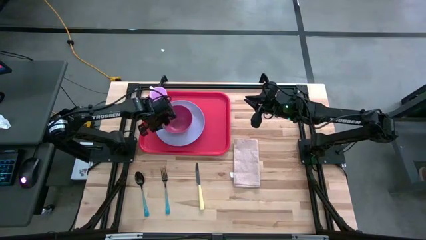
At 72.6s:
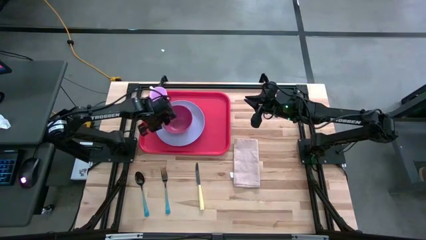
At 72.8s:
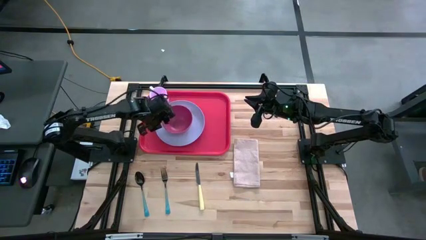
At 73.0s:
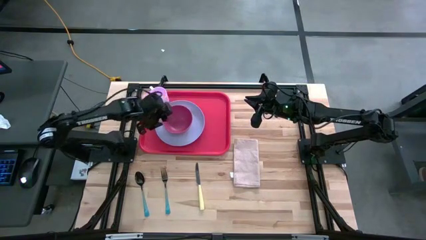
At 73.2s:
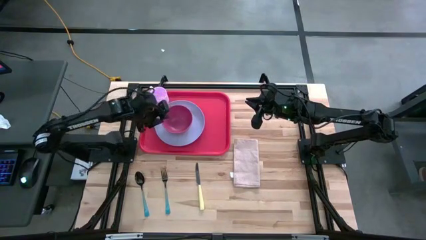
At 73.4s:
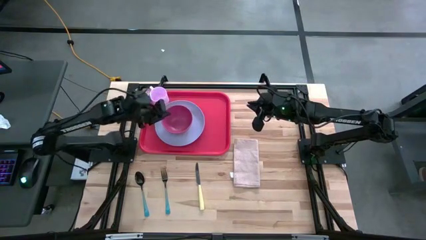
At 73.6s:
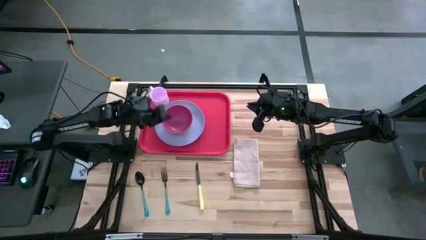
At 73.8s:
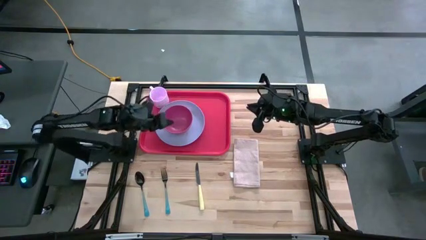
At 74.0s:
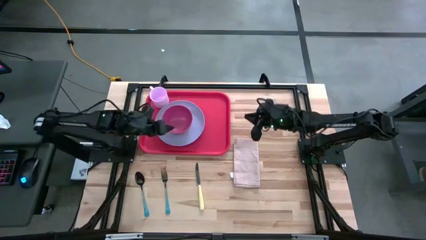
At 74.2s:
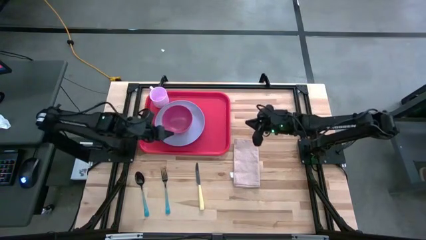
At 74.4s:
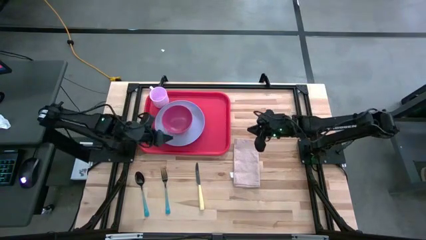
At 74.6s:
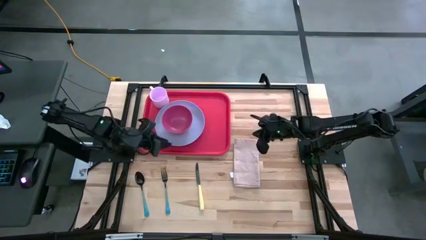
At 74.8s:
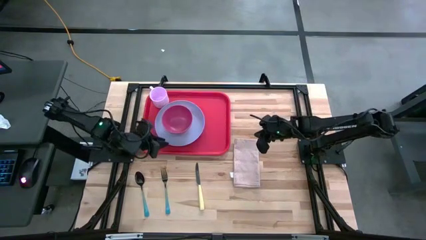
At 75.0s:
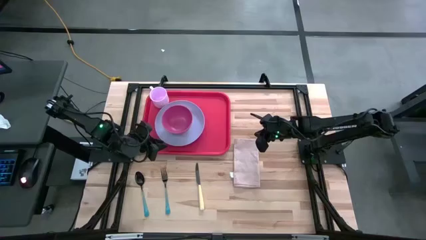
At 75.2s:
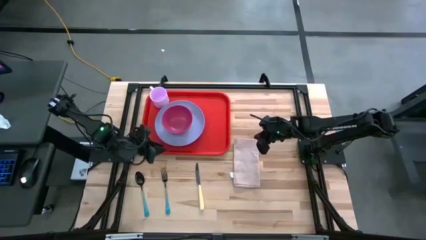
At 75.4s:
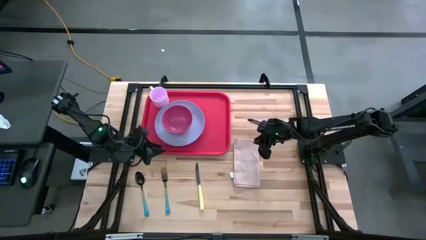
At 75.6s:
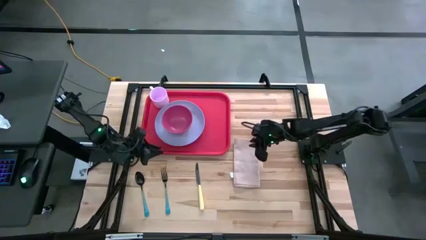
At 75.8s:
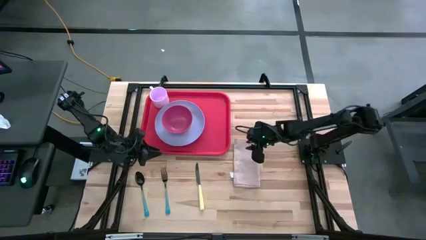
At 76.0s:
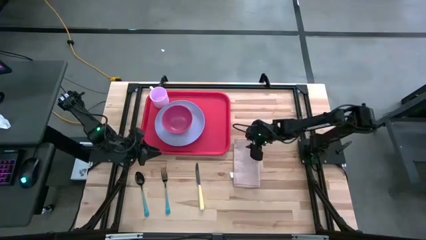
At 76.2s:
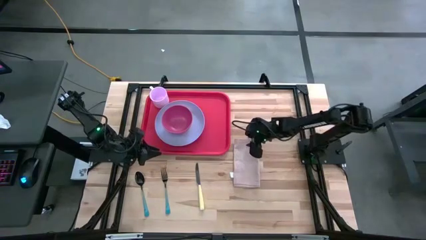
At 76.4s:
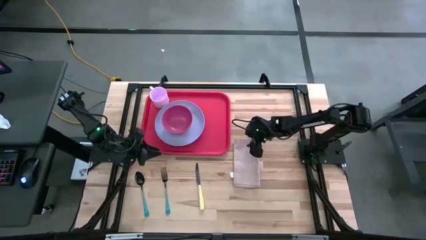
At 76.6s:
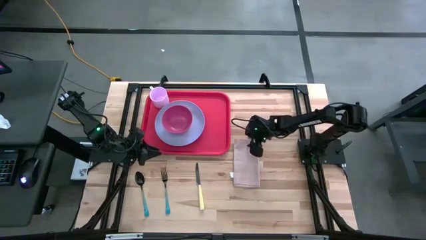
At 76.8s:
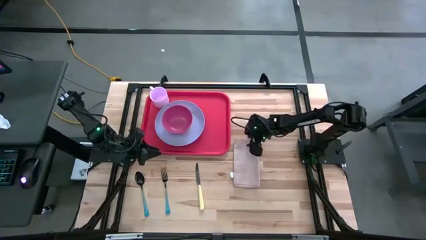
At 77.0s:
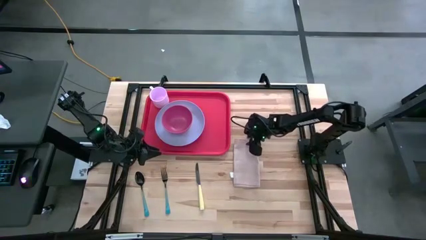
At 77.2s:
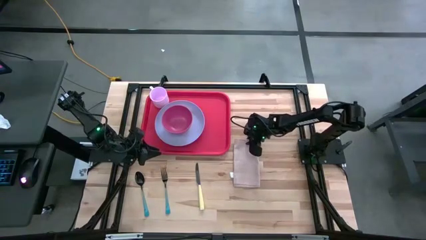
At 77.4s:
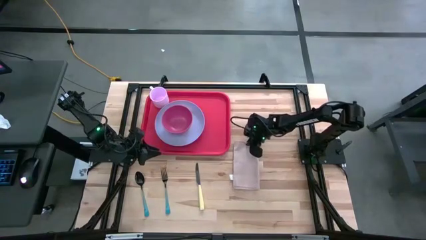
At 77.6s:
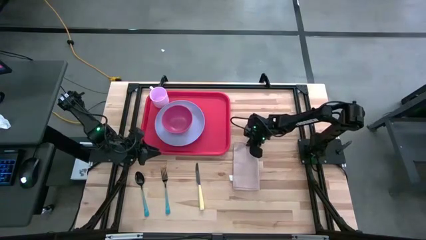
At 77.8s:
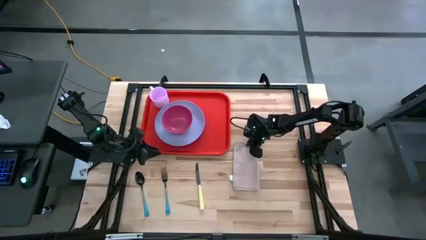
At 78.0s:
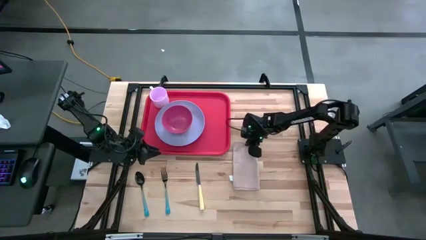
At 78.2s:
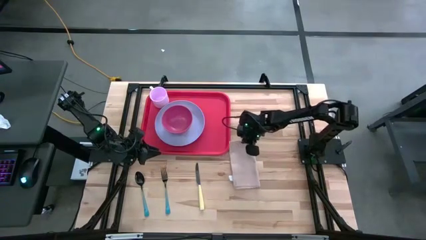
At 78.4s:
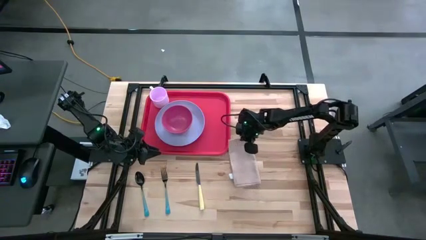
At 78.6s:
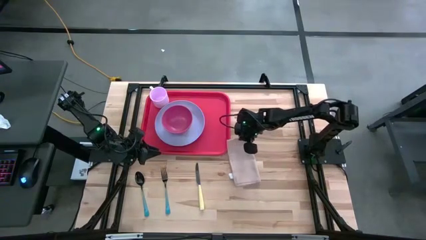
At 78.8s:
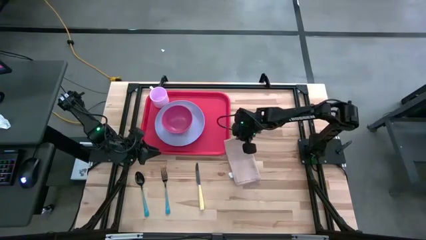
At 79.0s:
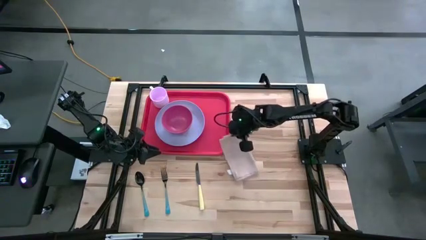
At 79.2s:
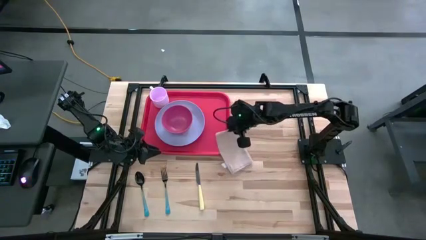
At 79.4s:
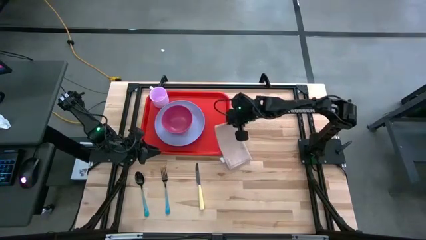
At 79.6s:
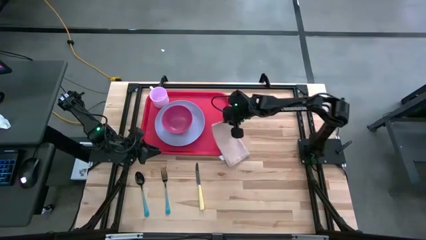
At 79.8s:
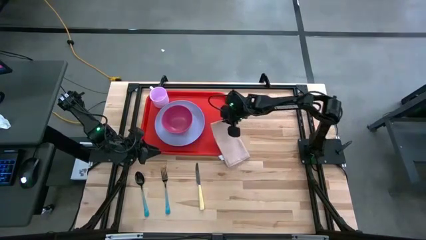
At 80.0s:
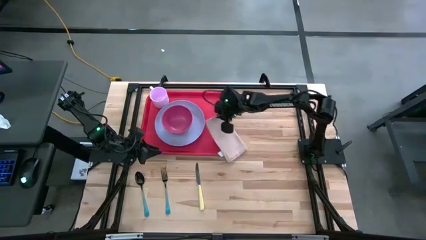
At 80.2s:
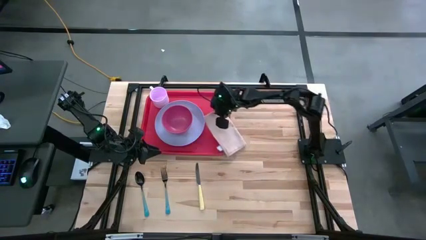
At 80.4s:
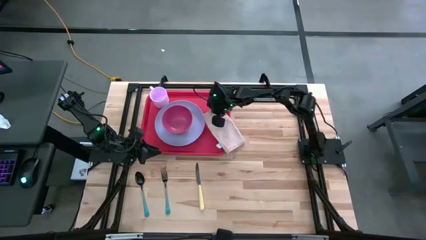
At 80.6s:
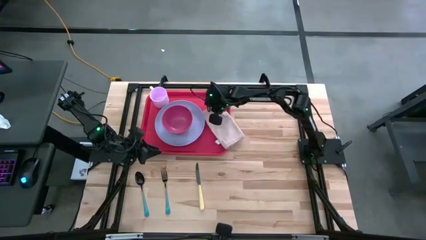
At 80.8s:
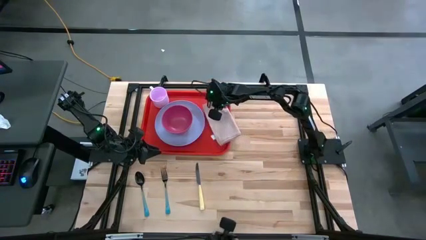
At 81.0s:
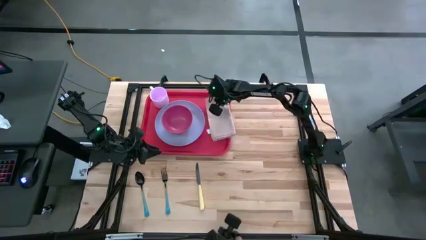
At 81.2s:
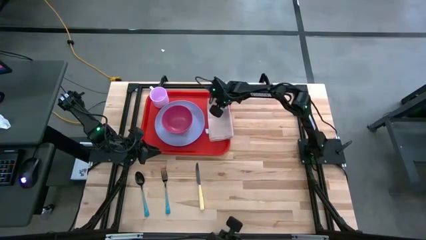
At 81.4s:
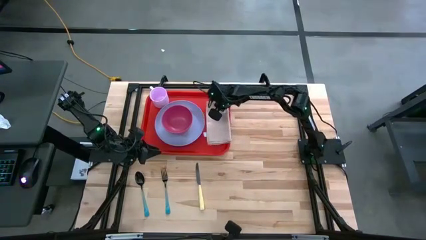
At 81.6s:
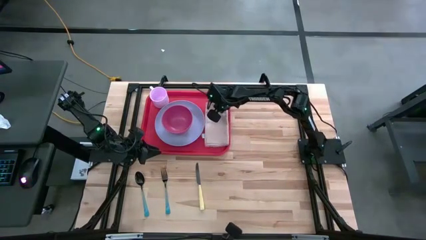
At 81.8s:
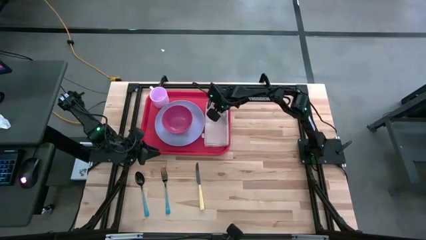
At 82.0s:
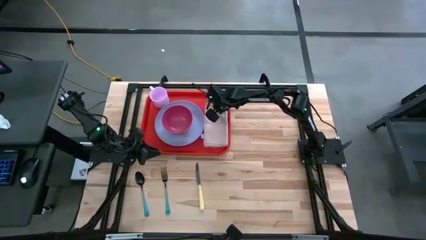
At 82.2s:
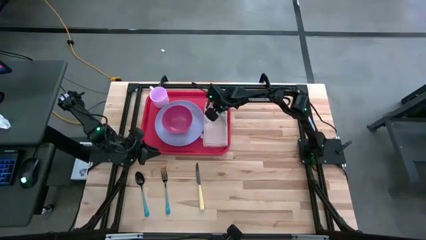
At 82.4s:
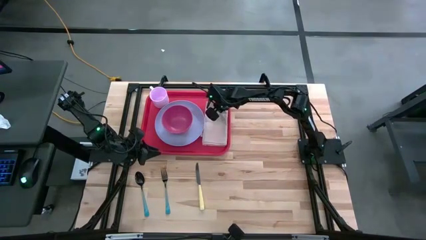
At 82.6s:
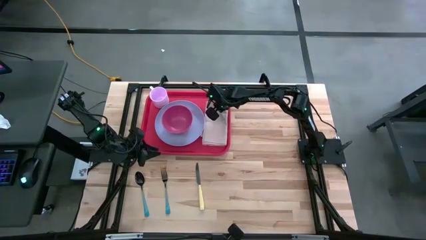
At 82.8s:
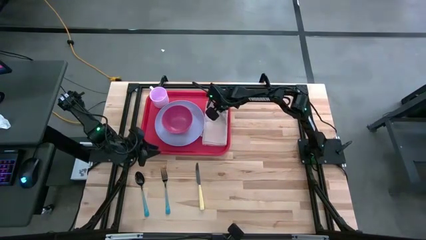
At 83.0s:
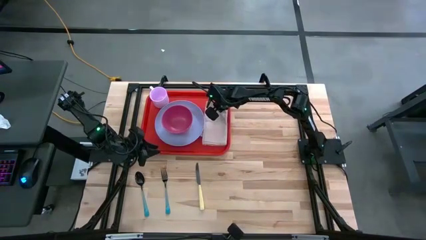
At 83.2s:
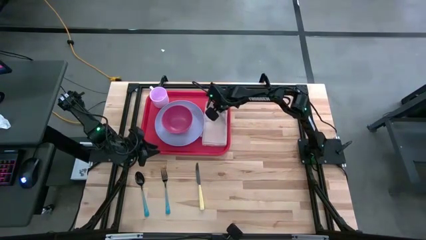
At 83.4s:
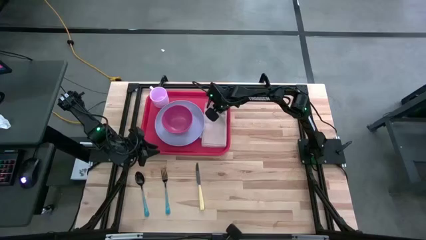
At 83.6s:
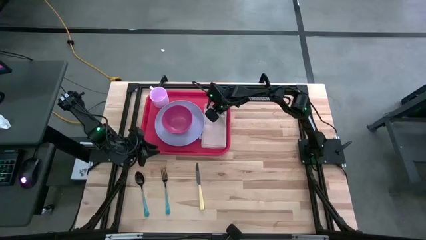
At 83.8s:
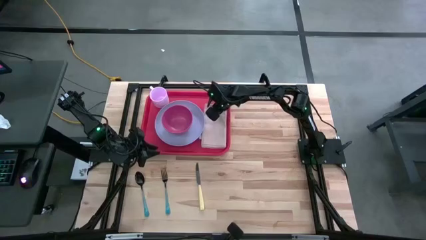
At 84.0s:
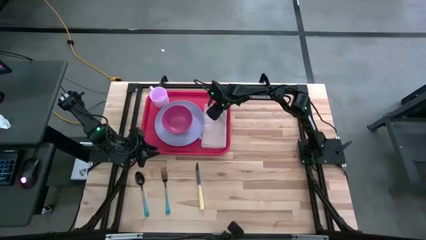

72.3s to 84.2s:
Task: Set up tray
Put the brown napkin on the right side of the violet plate on the red tray
